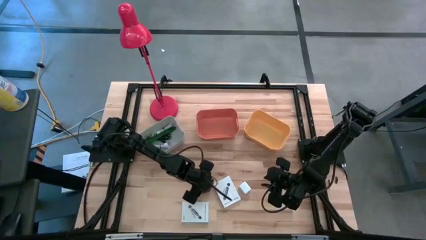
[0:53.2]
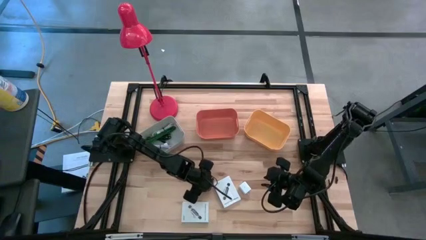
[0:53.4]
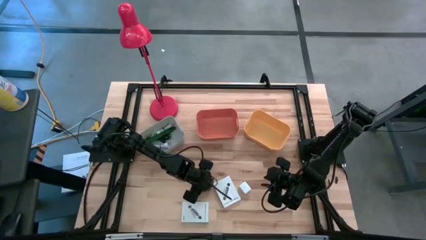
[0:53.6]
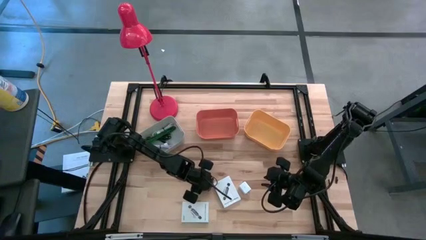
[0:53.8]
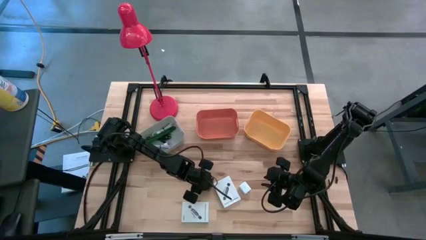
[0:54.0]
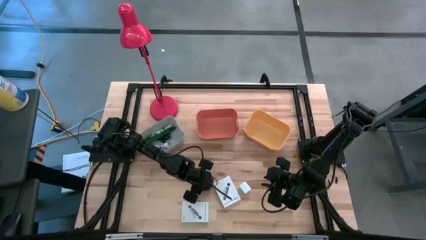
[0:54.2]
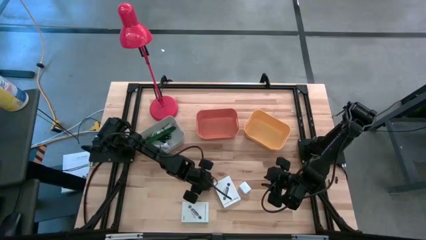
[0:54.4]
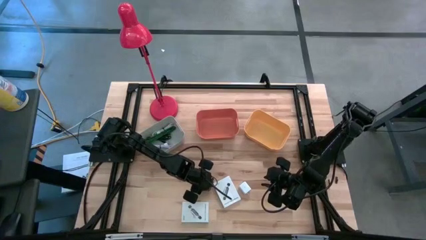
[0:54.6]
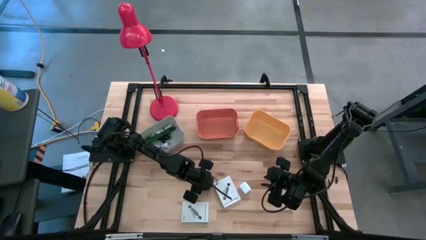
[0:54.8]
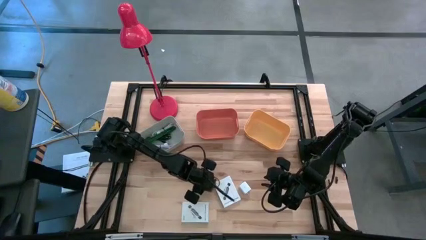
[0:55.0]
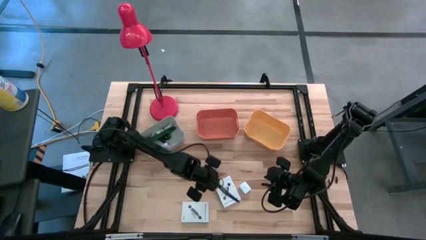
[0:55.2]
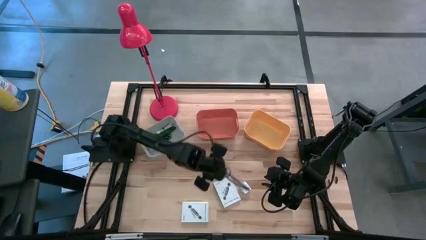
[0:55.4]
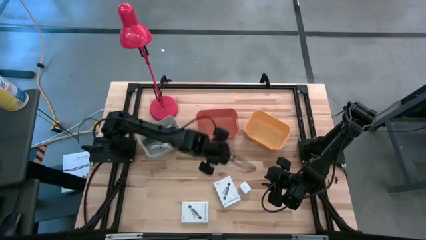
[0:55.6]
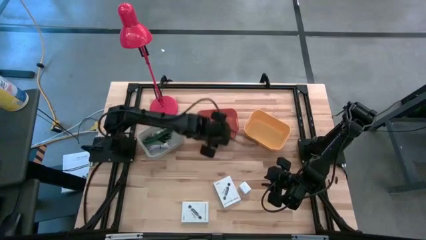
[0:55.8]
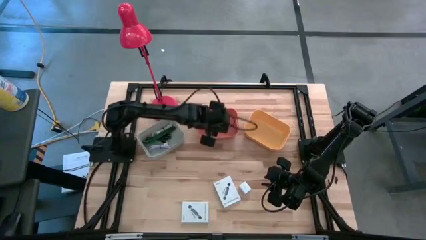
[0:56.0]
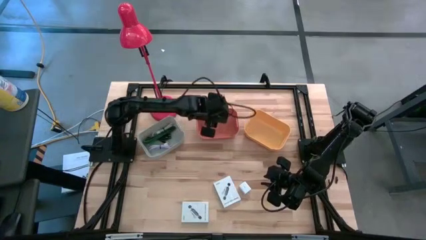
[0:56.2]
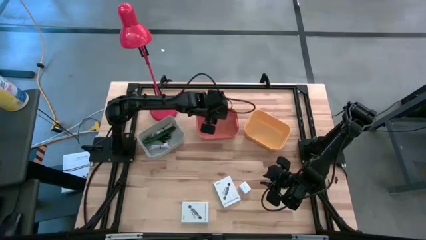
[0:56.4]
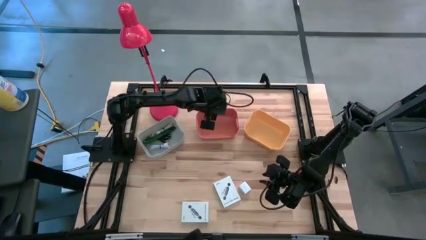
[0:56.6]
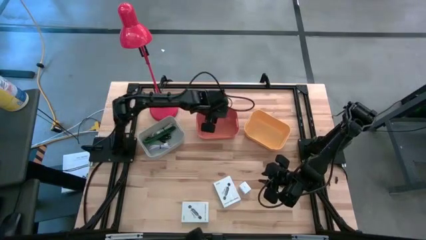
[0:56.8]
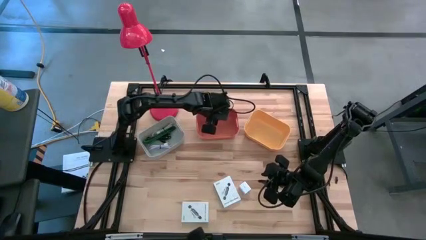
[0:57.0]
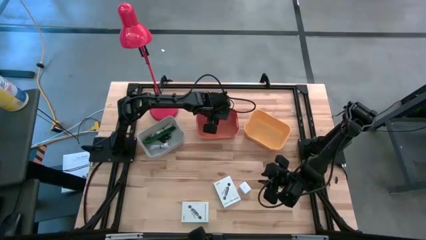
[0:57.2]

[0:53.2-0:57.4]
Task: Pick and place items into bin
Put the pink charger adapter into the orange bin

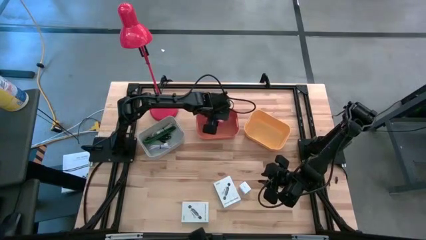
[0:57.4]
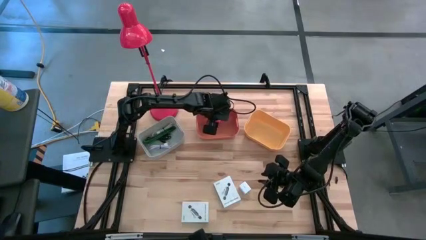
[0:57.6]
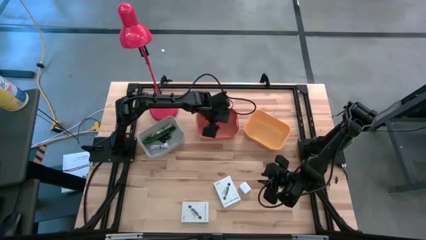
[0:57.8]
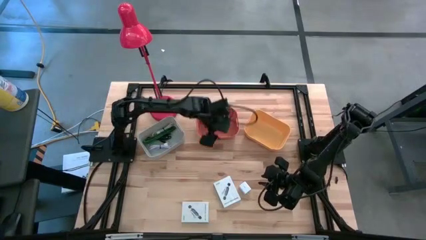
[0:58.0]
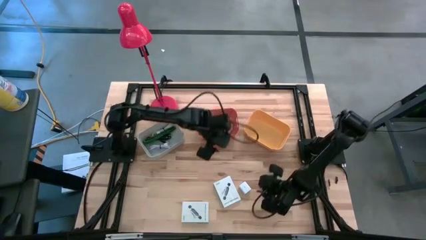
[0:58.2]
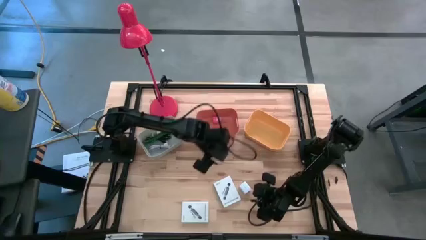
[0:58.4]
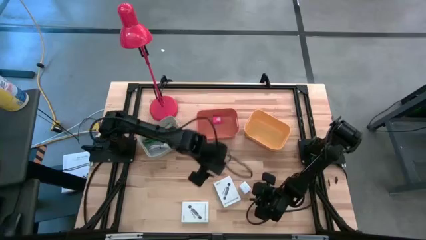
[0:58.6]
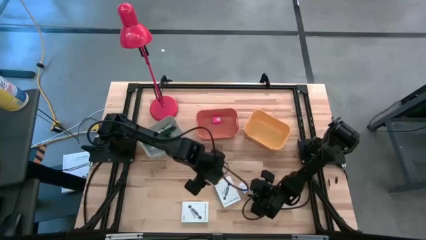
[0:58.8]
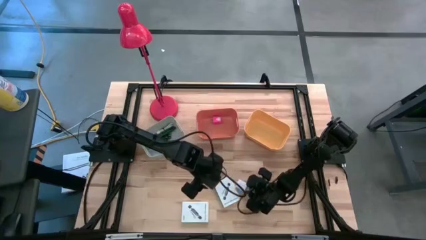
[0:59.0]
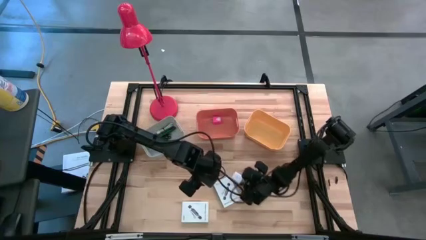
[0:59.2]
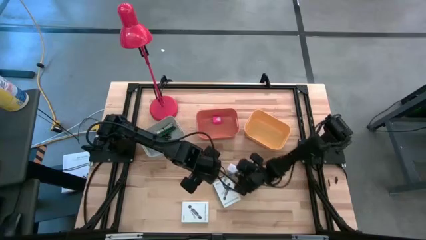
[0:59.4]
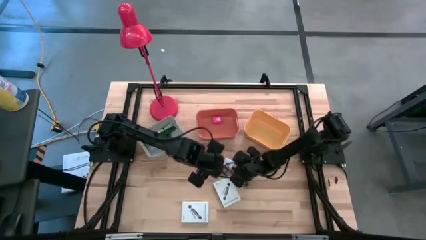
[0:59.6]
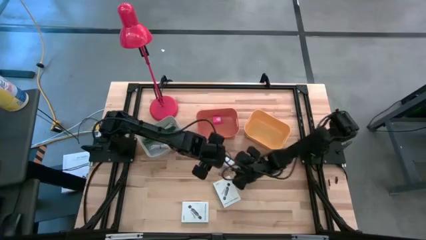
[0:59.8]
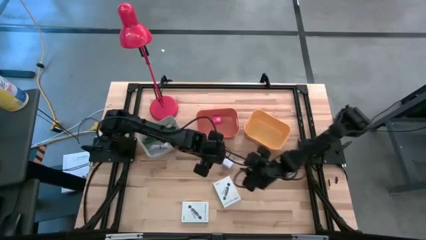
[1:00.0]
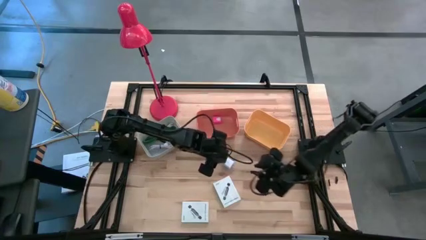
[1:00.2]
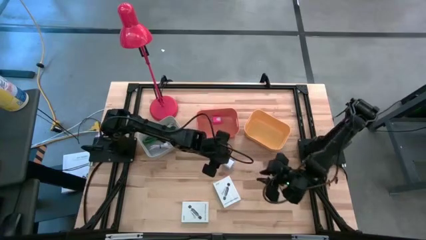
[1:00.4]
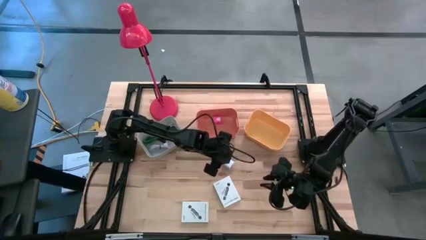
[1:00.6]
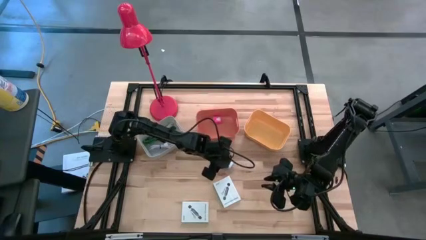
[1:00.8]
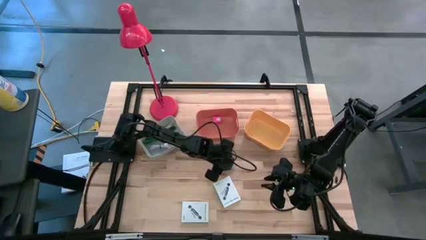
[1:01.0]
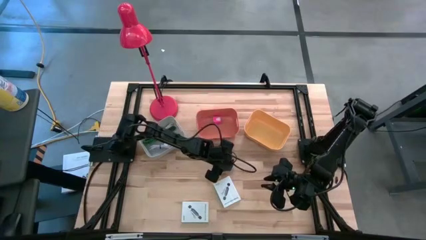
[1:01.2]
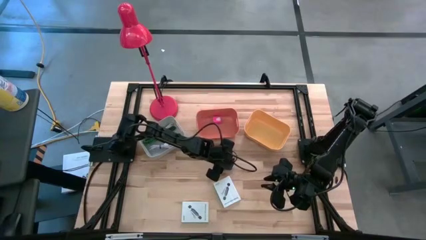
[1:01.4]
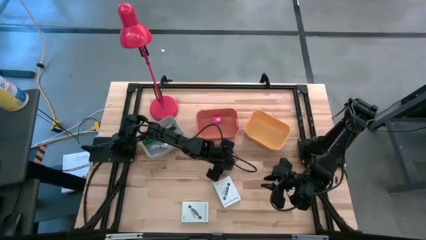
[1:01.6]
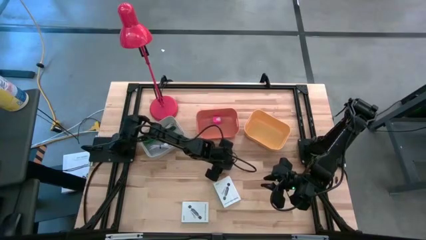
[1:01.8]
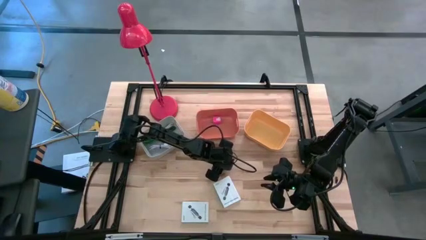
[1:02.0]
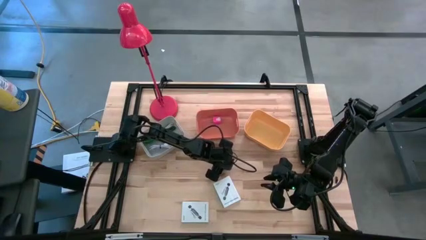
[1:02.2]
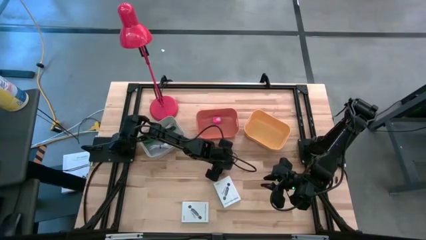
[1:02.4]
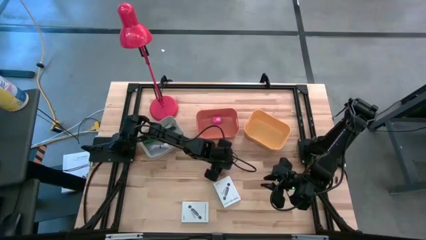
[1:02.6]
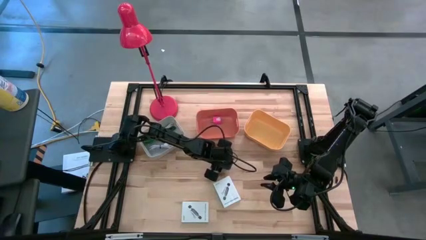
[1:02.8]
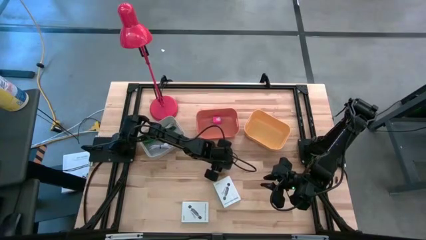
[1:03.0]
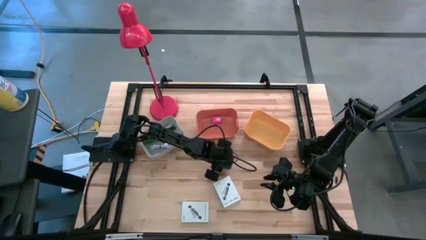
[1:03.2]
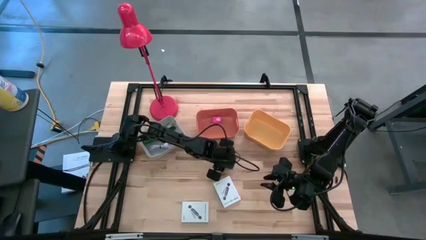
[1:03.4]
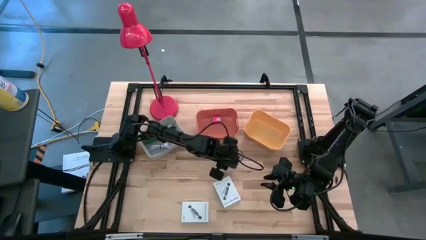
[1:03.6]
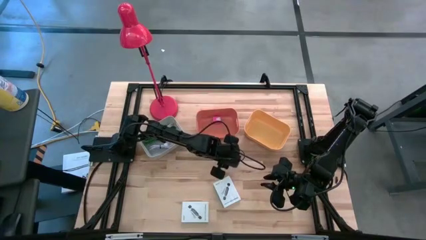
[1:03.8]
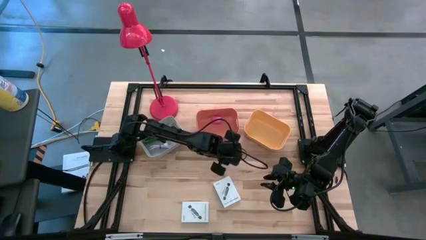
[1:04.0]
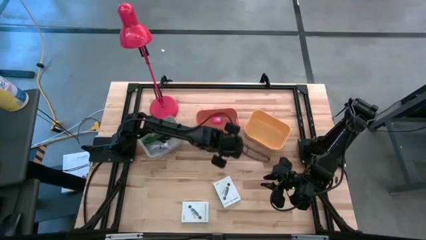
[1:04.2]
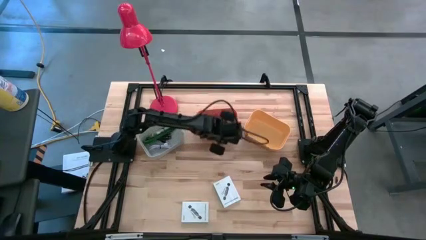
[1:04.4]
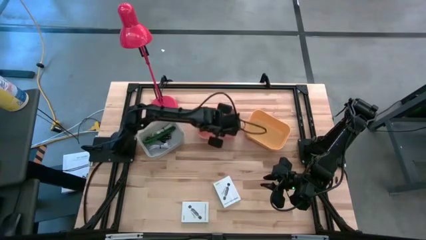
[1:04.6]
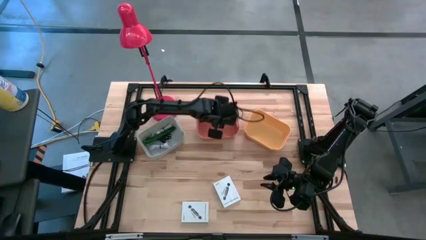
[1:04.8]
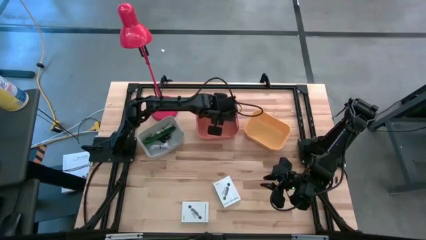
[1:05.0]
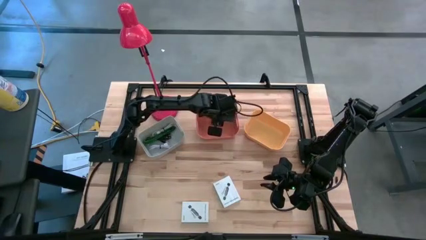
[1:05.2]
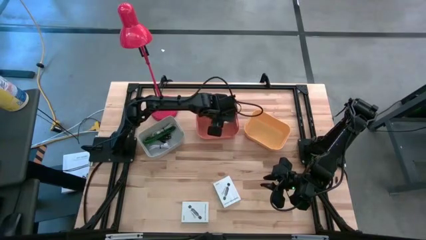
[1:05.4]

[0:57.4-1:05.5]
Put the white charger adapter into the orange bin

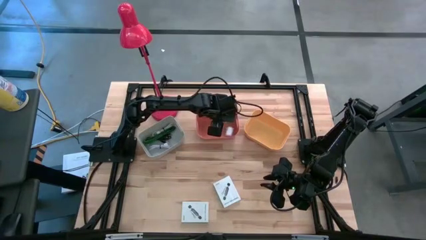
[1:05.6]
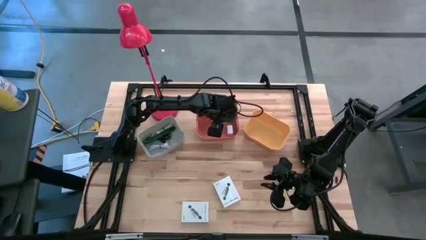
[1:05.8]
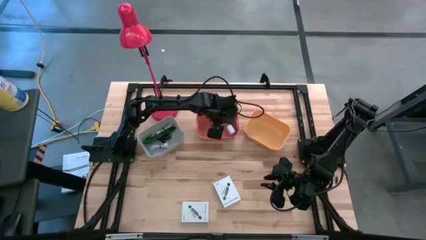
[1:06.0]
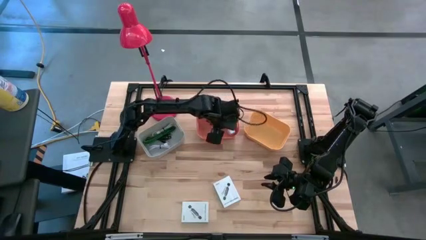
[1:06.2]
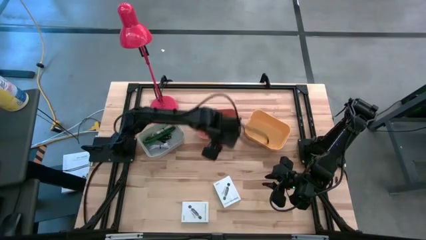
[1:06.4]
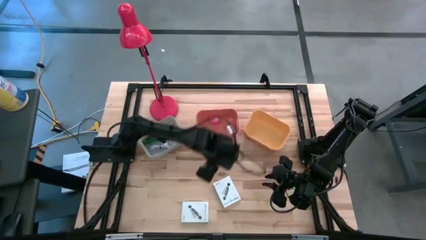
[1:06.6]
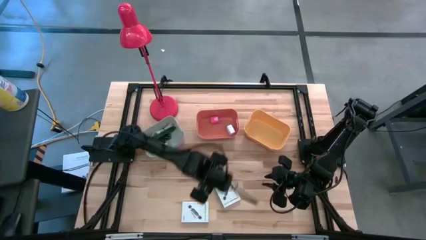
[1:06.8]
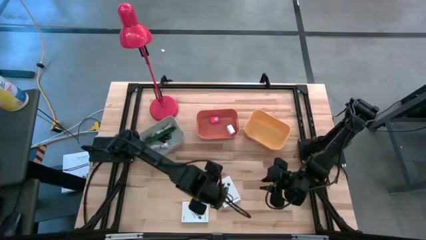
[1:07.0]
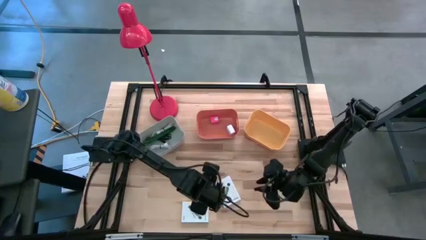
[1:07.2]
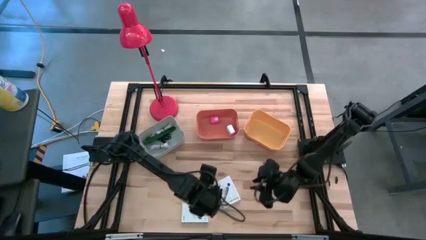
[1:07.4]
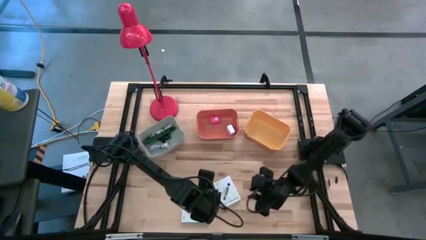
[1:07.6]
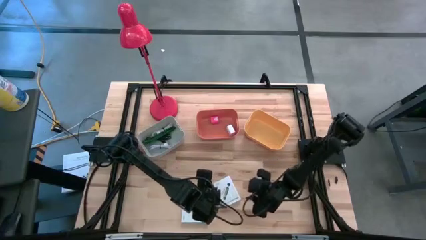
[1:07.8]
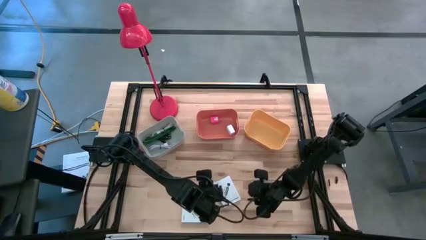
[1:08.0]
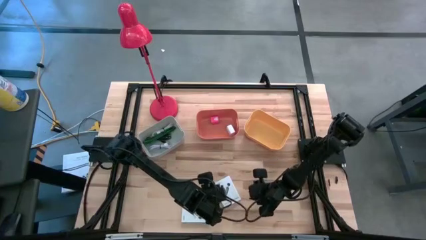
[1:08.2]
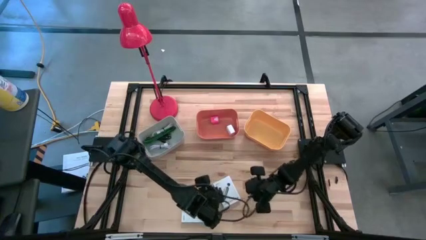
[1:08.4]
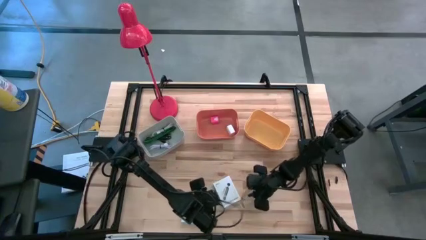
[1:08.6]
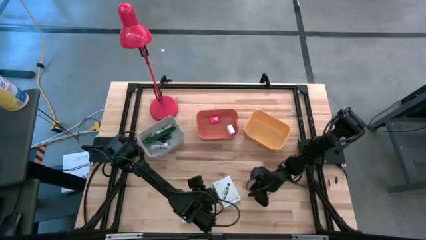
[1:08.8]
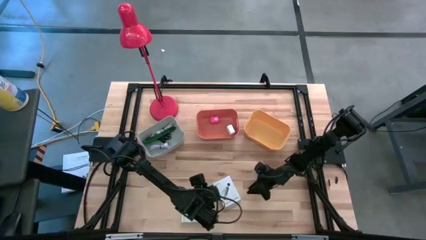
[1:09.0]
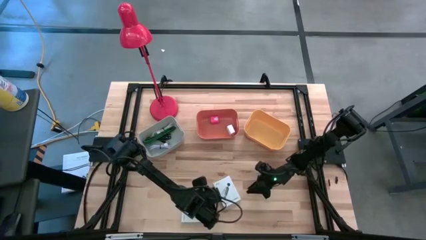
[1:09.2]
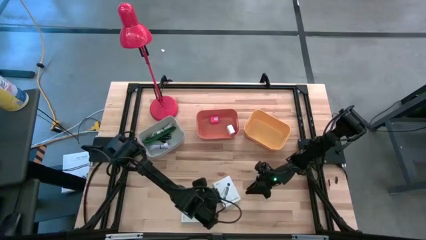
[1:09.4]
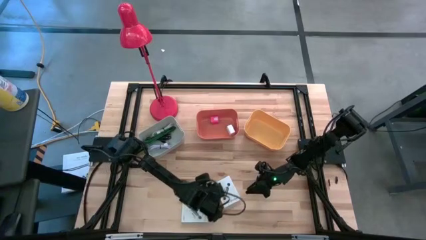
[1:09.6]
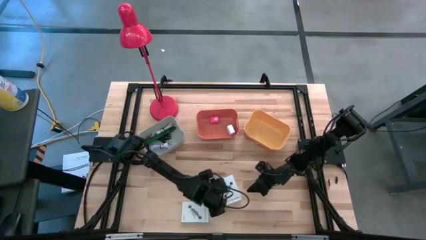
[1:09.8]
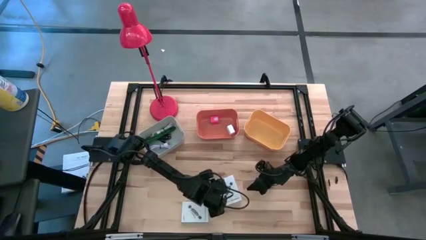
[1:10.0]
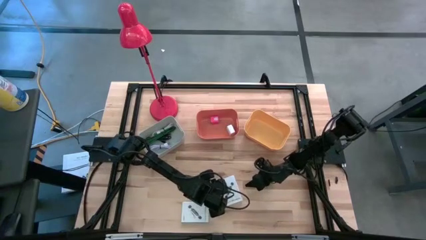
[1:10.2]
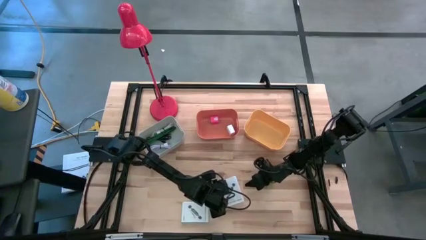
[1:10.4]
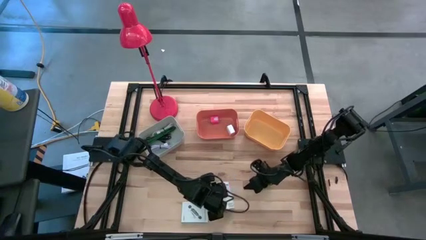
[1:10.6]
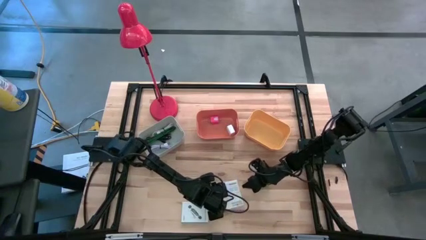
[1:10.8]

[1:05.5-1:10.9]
Put the right white box into the yellow bin
